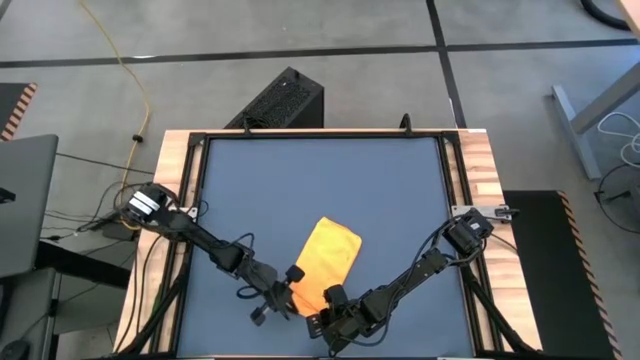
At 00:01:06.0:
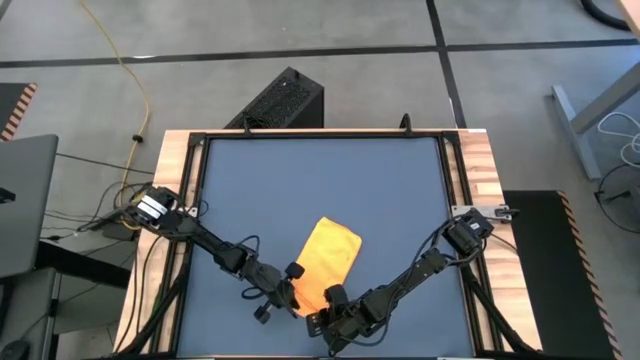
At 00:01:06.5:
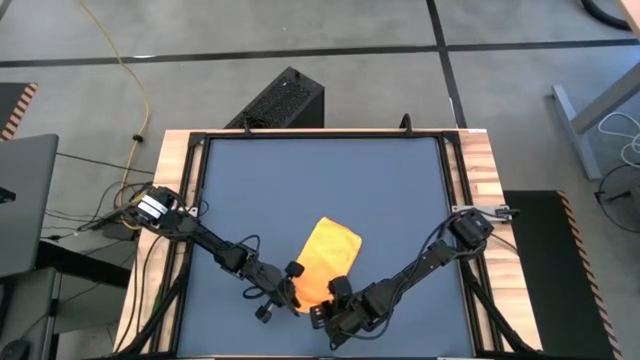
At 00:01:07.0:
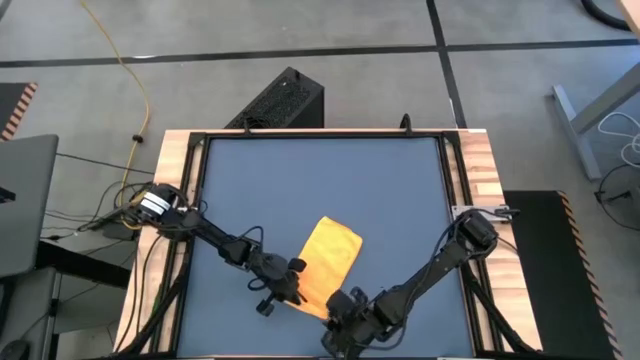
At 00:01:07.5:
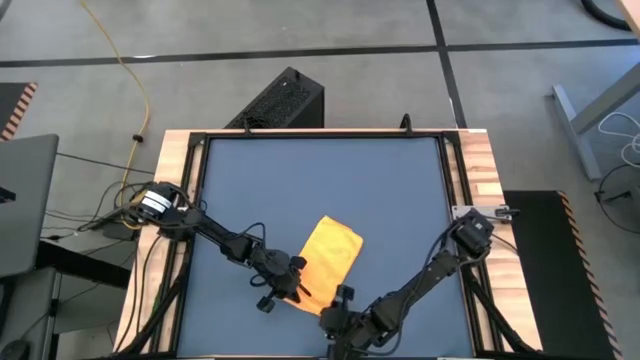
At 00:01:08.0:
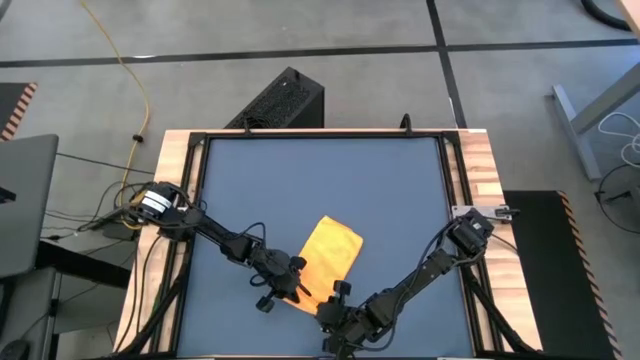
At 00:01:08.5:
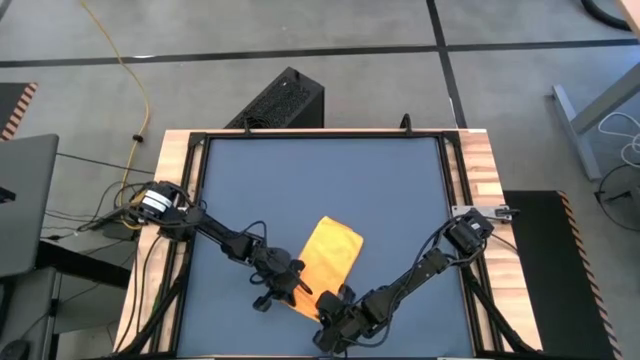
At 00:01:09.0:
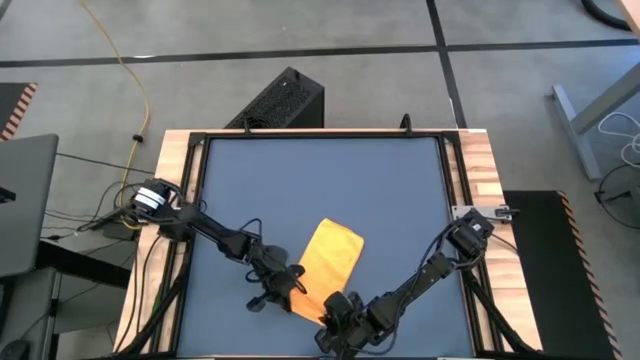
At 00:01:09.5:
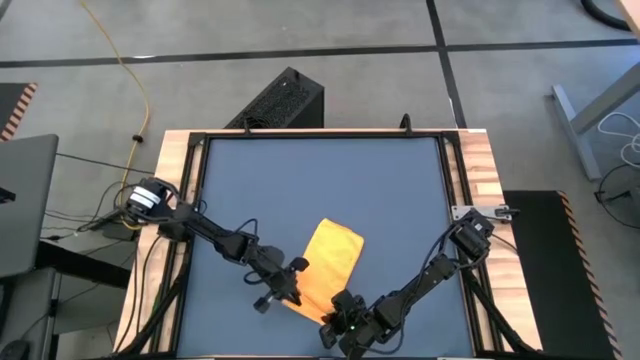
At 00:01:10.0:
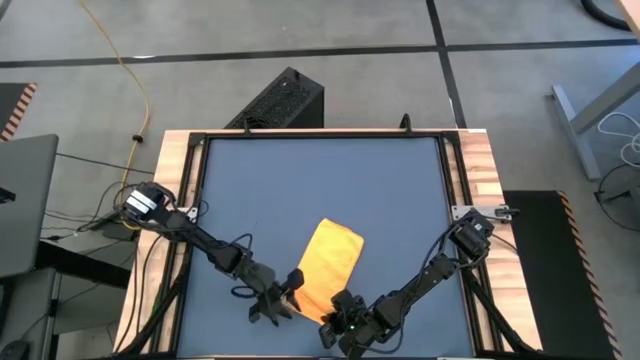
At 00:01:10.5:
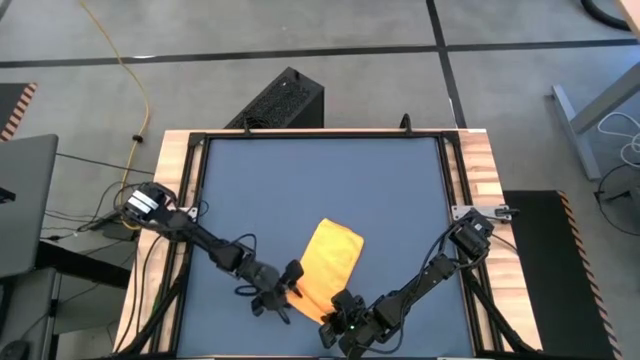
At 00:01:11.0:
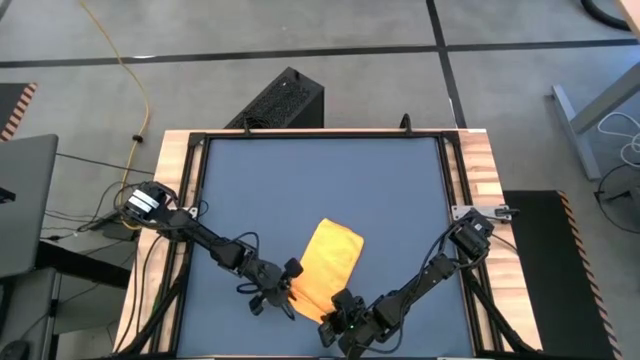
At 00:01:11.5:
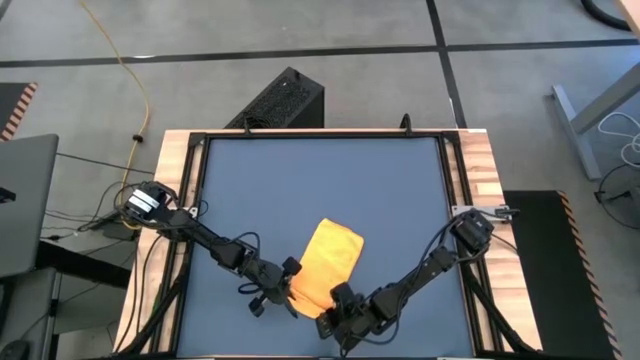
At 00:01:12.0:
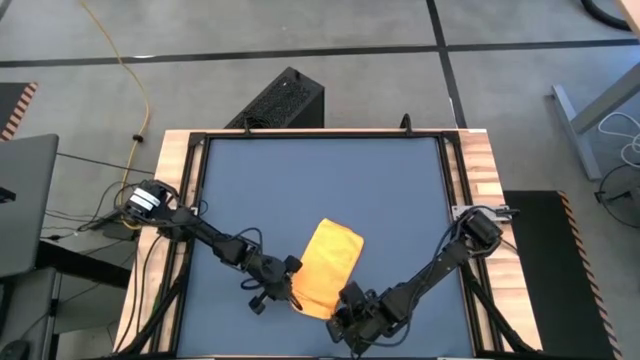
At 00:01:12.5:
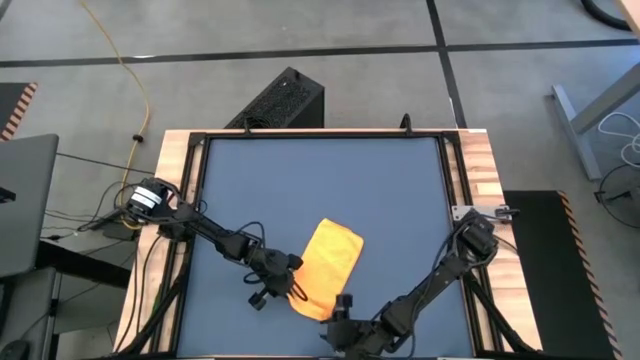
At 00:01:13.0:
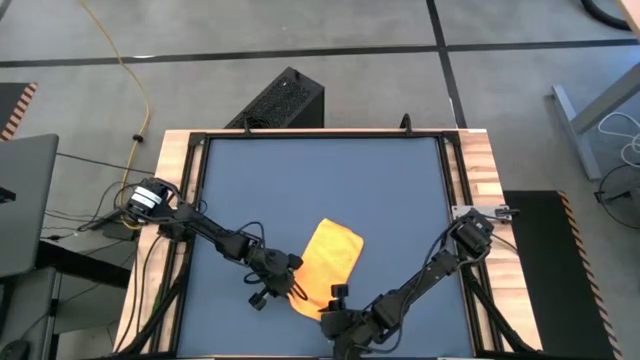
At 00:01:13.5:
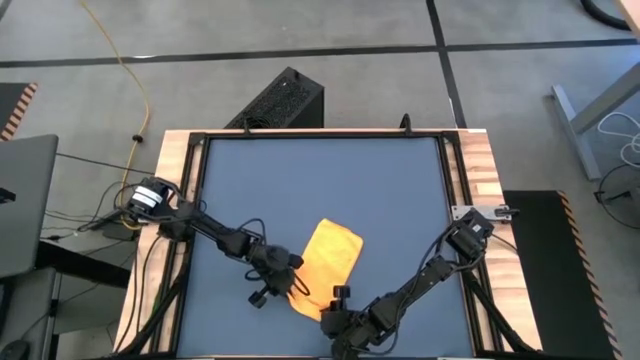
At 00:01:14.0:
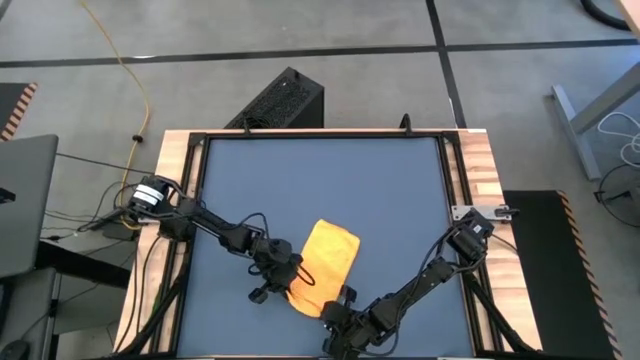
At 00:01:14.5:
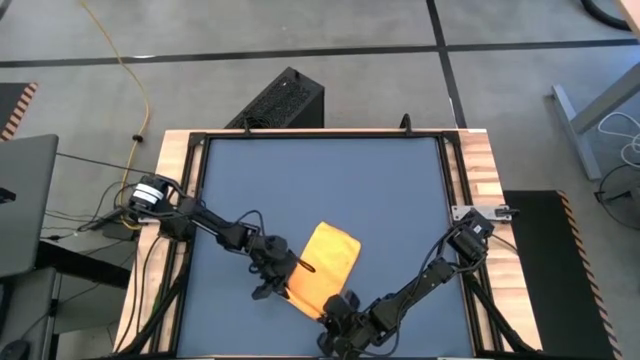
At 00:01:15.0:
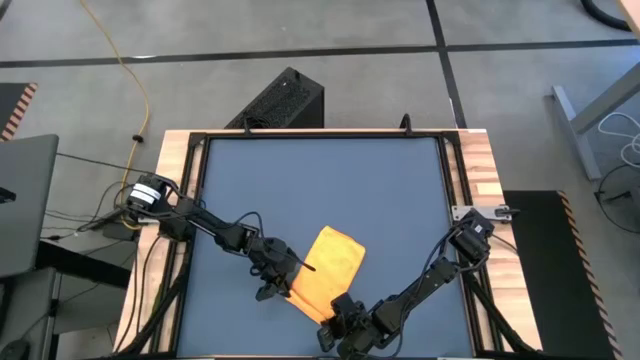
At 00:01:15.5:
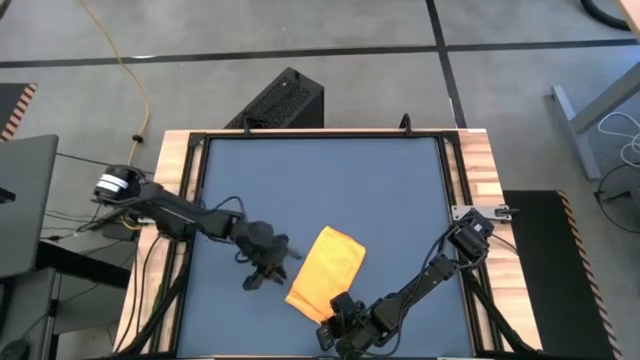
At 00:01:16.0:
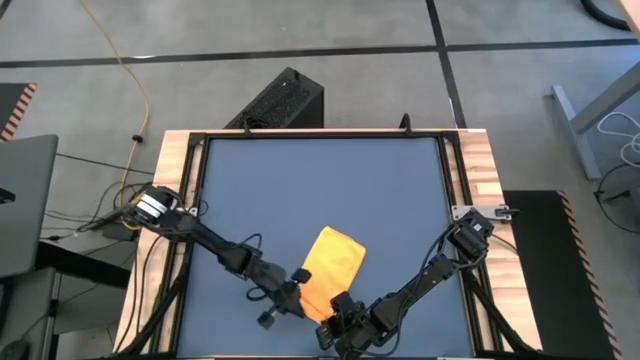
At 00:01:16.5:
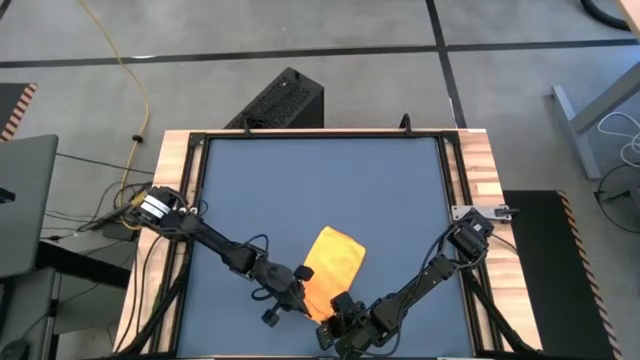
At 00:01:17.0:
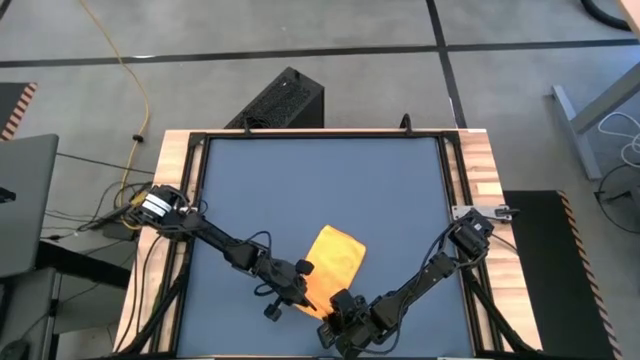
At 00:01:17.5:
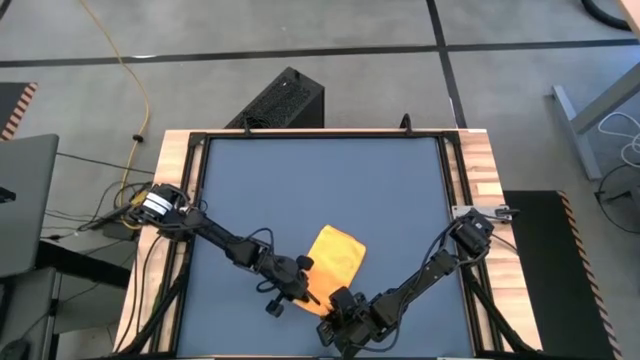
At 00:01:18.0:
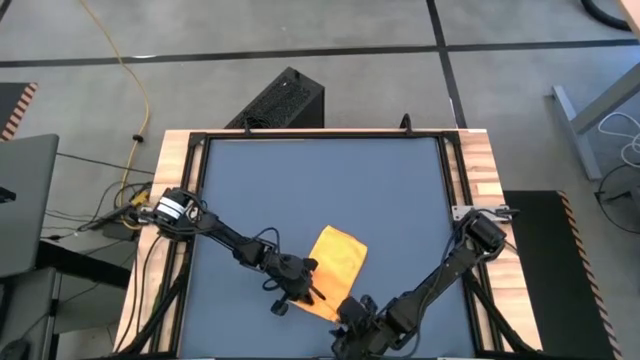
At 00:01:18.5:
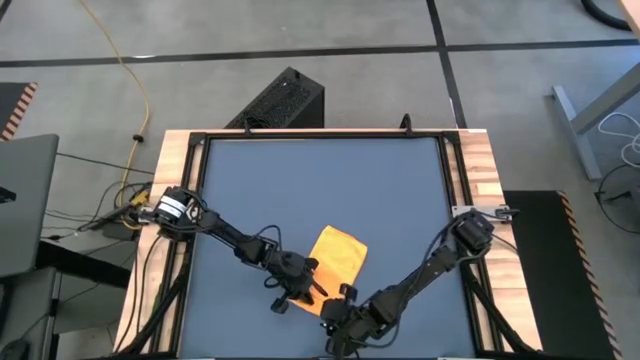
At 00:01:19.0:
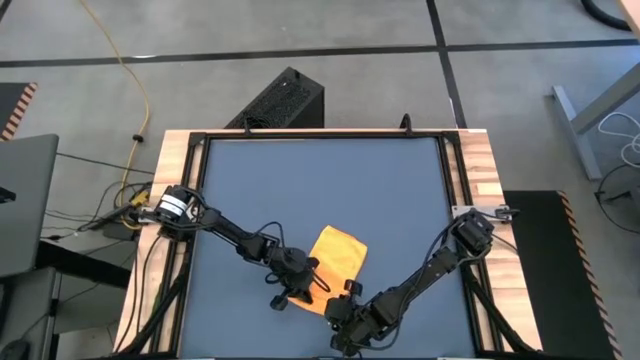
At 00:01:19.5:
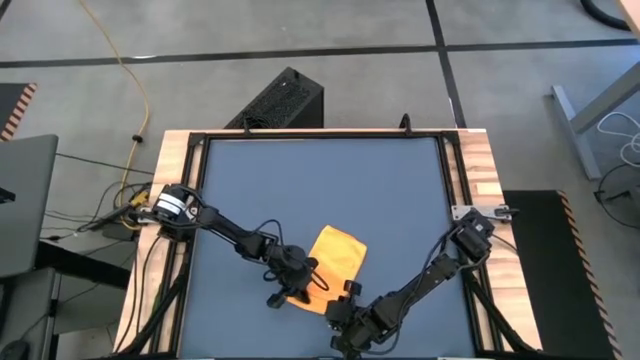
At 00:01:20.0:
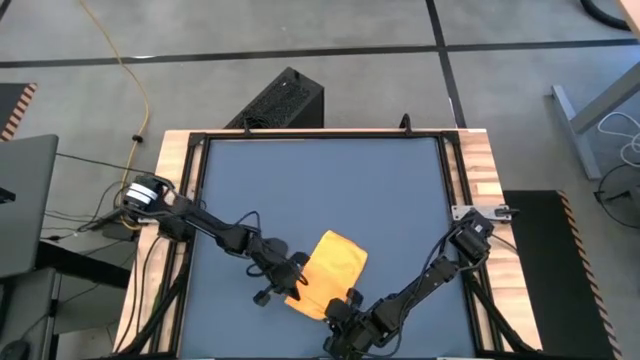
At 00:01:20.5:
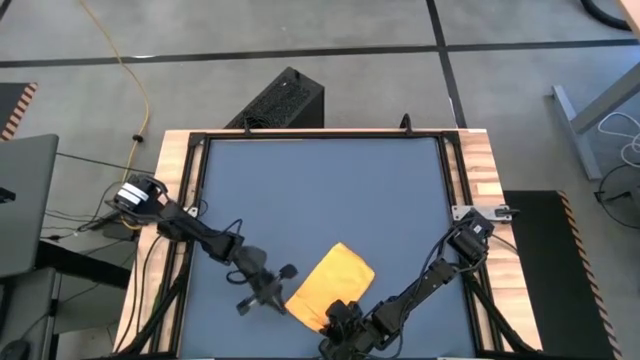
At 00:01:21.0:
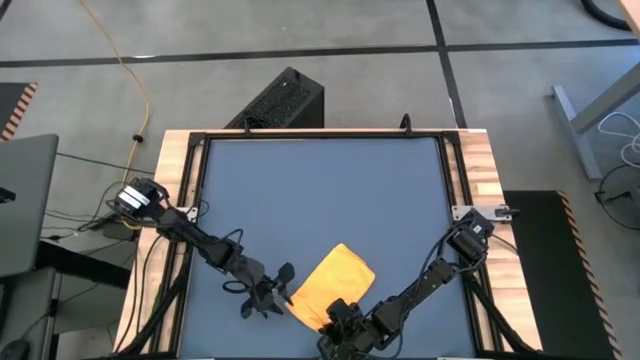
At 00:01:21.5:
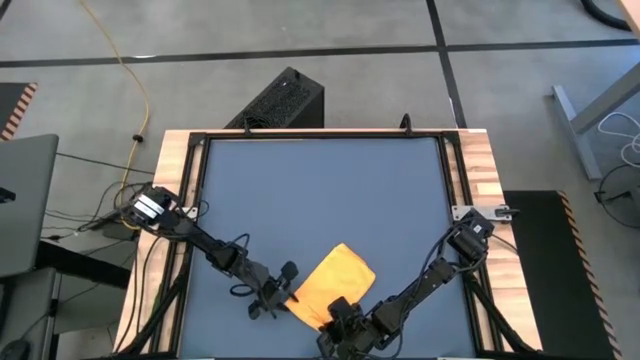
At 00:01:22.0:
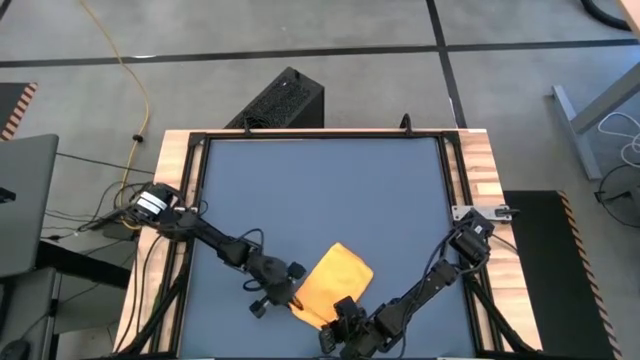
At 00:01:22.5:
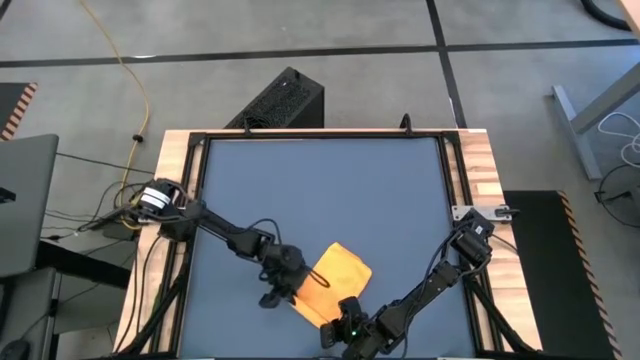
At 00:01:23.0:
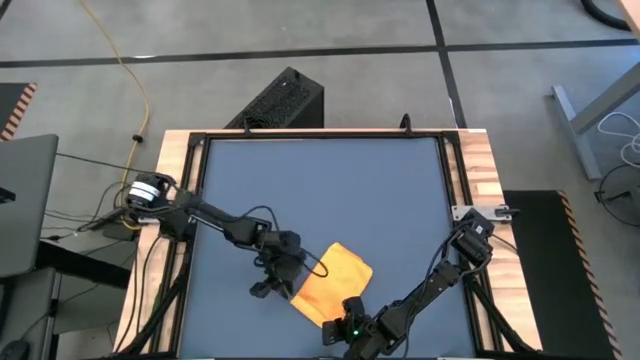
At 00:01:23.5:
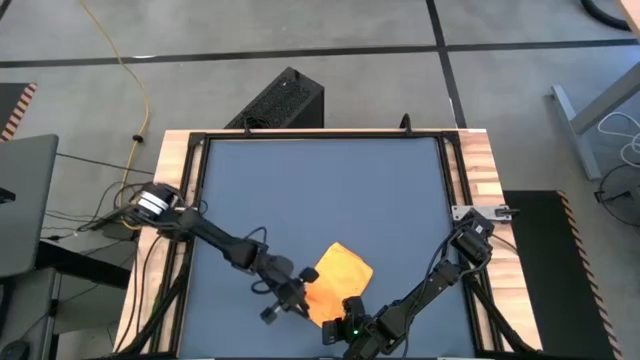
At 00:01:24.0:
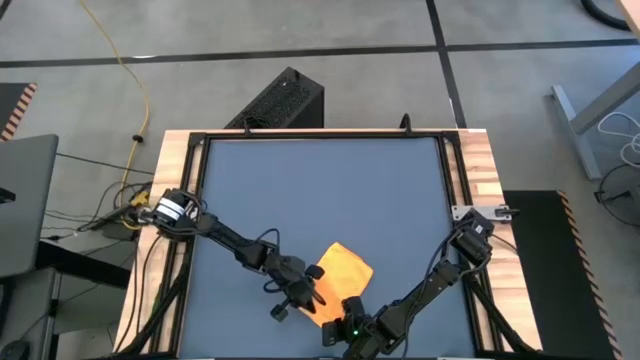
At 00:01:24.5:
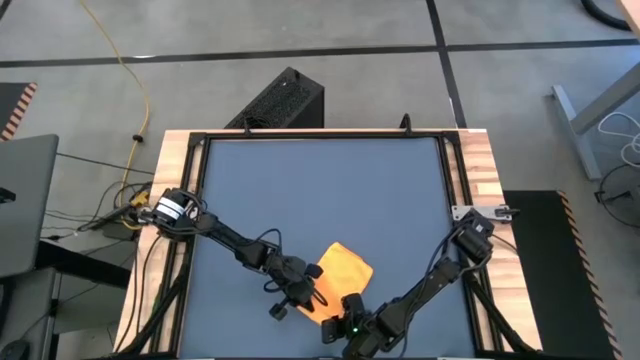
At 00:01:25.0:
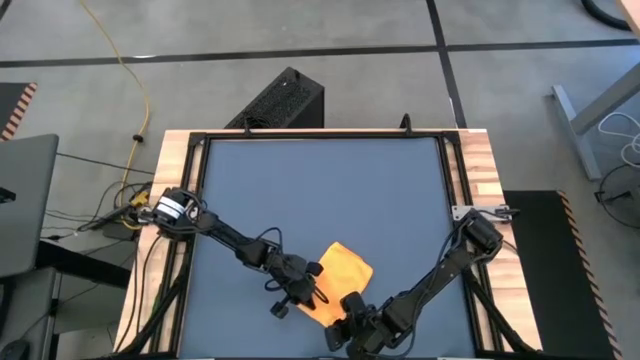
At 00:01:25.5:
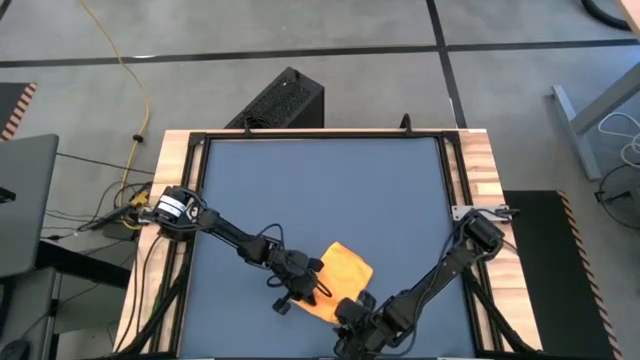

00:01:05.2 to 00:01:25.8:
Task: Roll towel into tight, uniform cylinder
Roll the orange microfiber cloth
